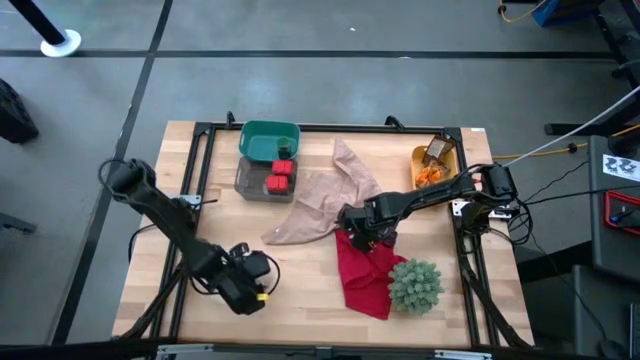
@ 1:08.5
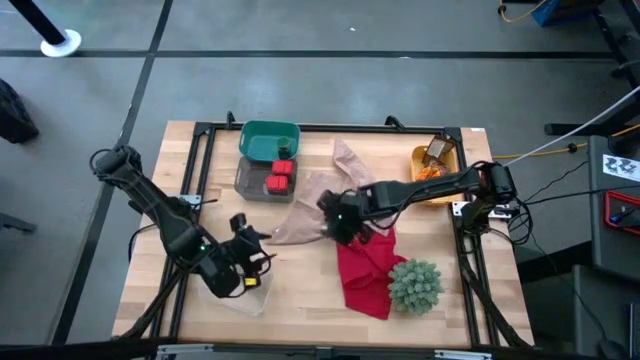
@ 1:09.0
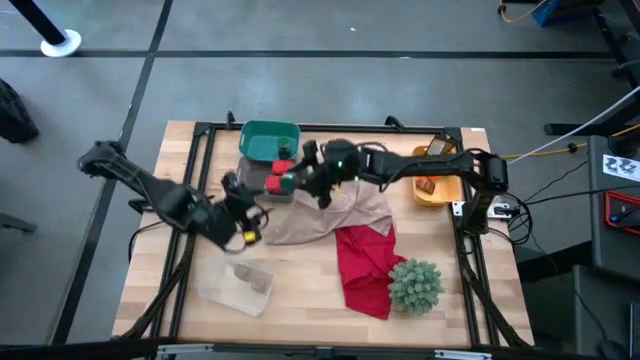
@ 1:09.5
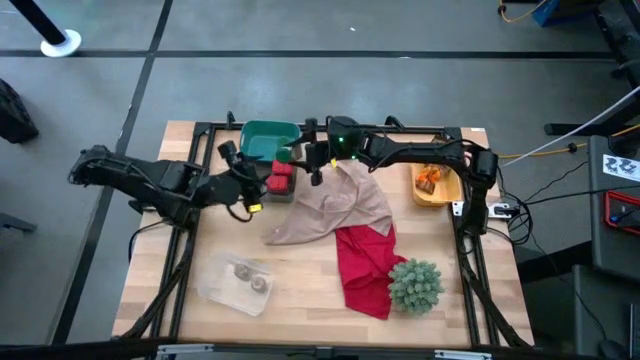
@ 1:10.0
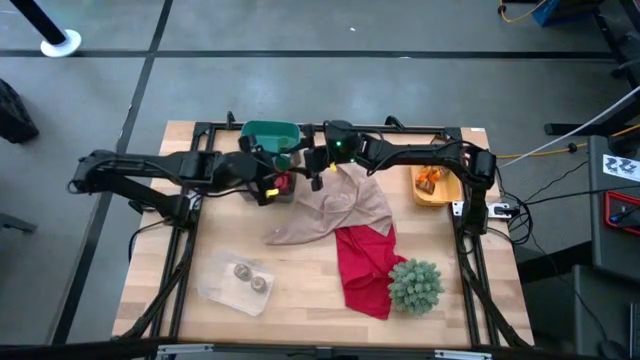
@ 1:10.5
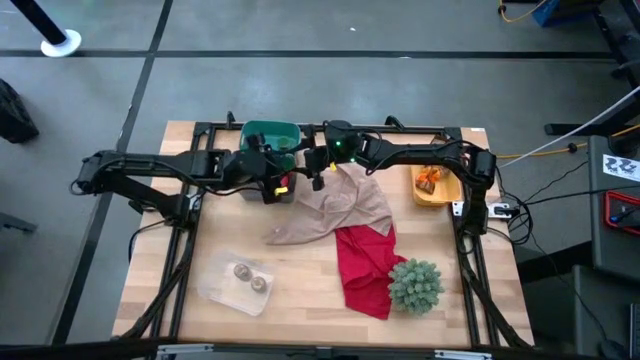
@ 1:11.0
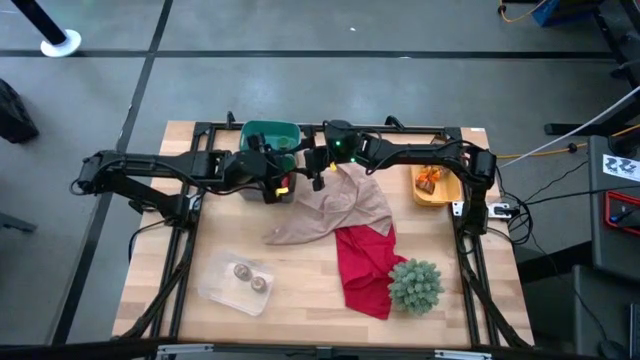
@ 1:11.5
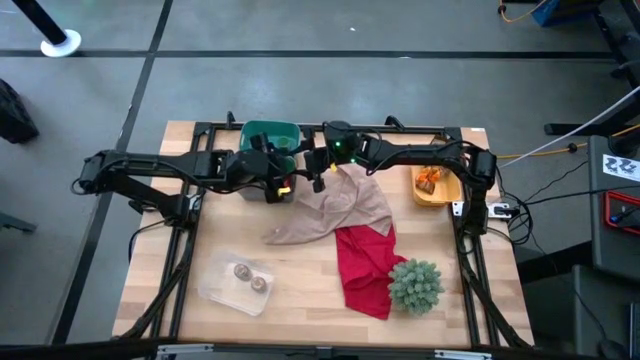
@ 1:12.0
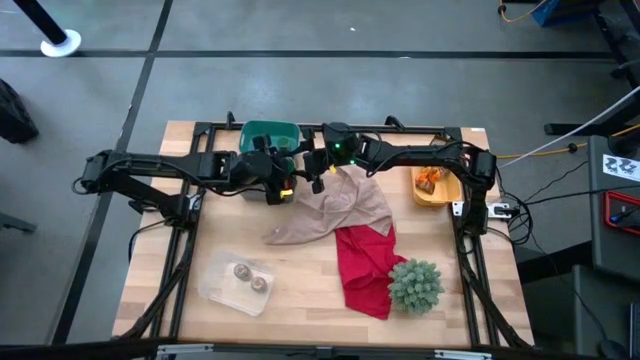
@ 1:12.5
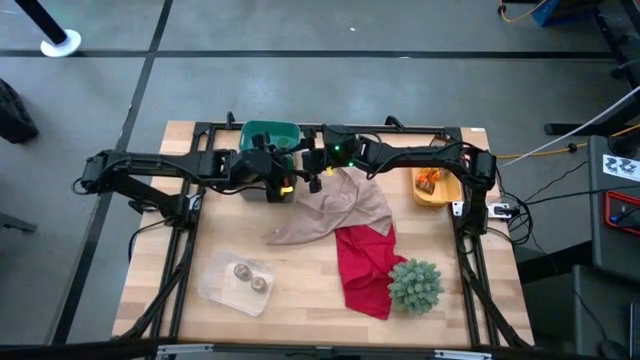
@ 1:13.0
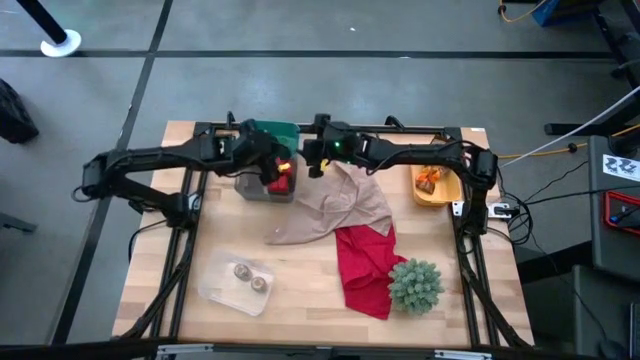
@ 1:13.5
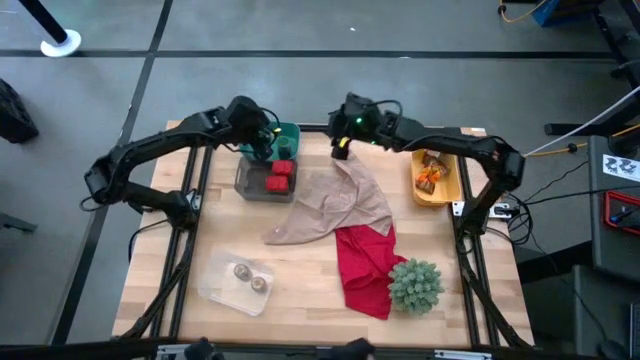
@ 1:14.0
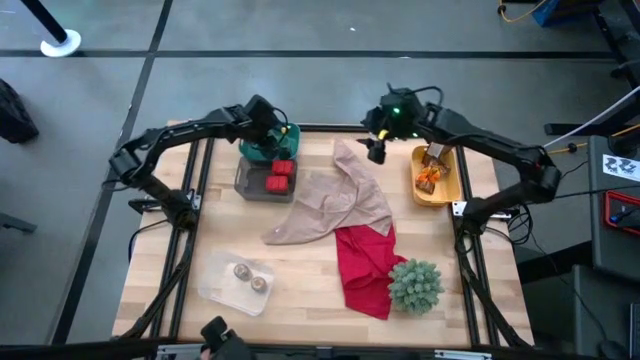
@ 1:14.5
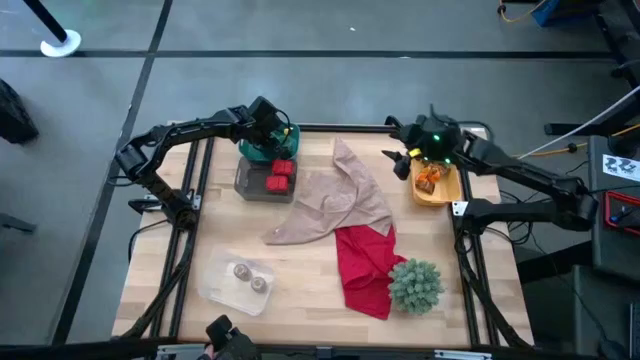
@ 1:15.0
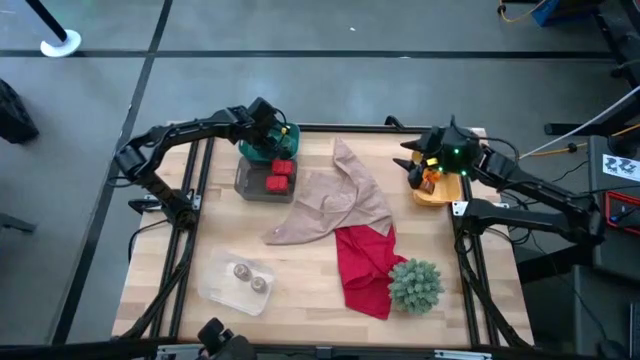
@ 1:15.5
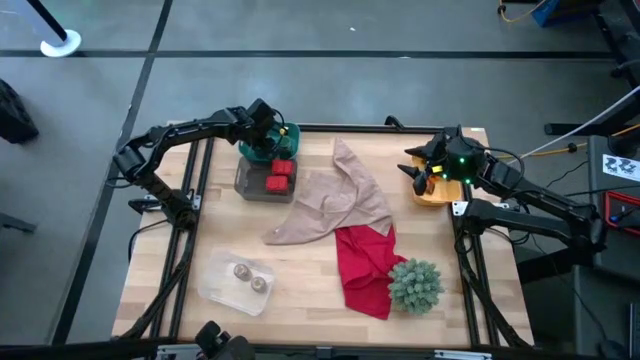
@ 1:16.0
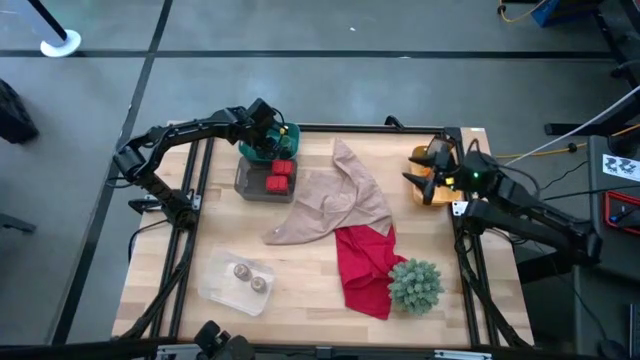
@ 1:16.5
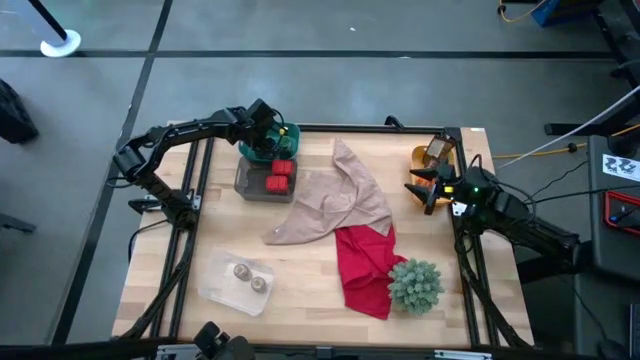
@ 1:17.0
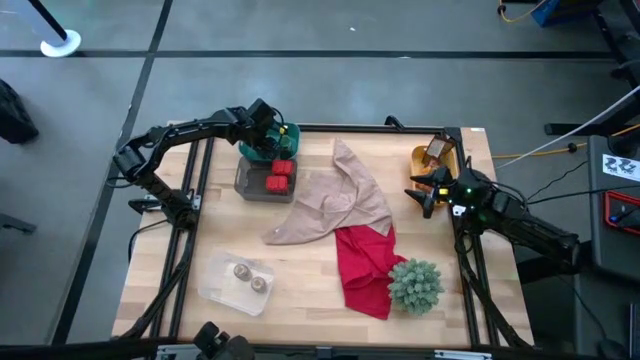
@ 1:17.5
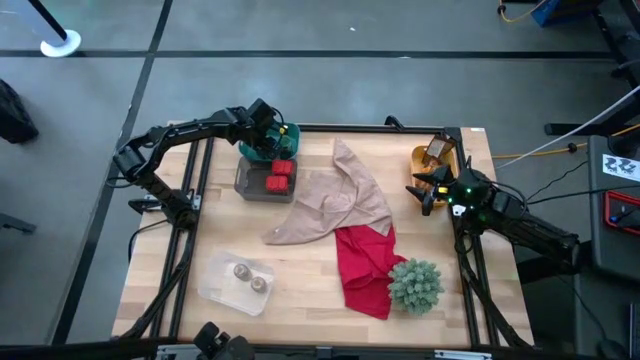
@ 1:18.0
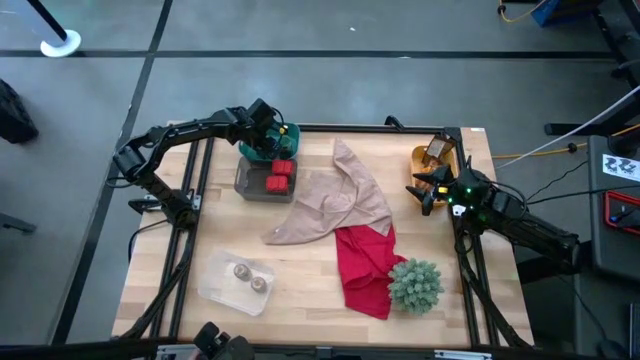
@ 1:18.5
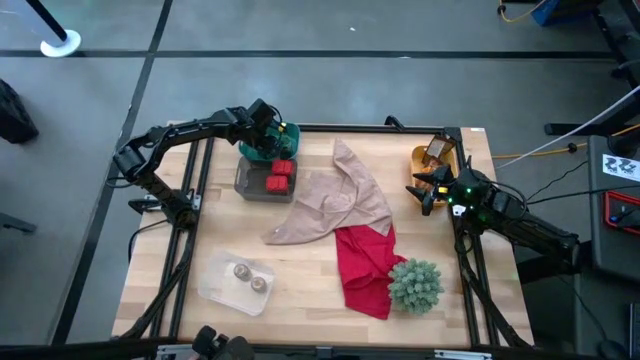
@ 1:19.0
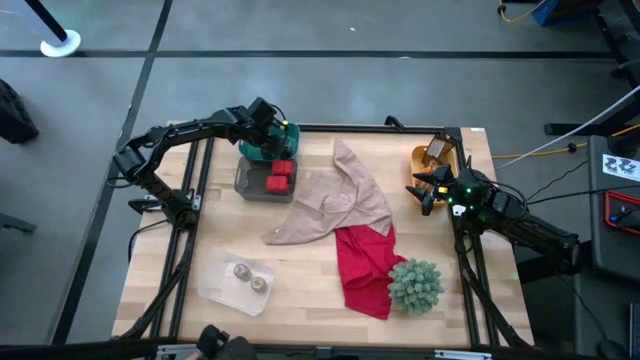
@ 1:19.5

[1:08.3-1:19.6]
Task: Sort spices by type
Put the green seasoning bottle into the green bin

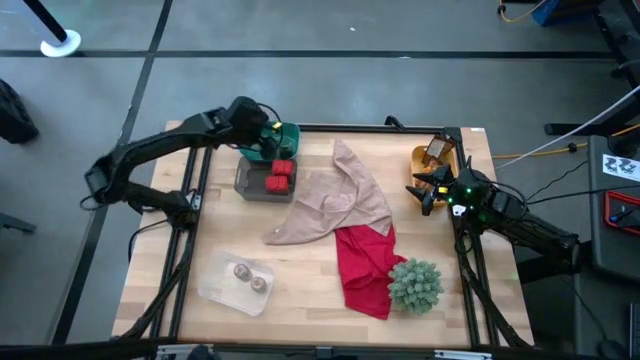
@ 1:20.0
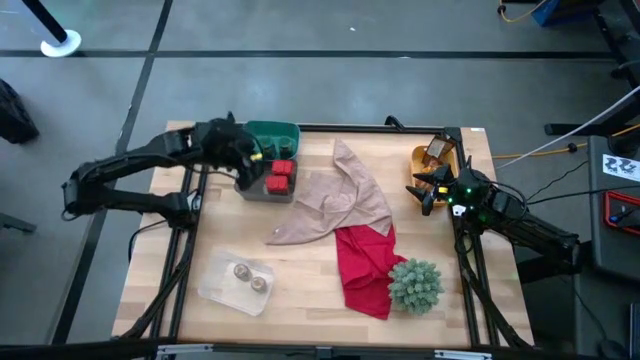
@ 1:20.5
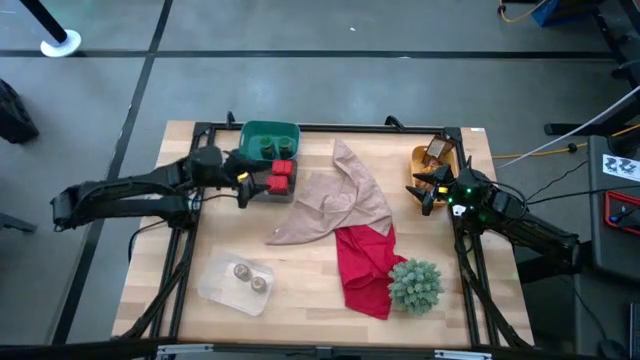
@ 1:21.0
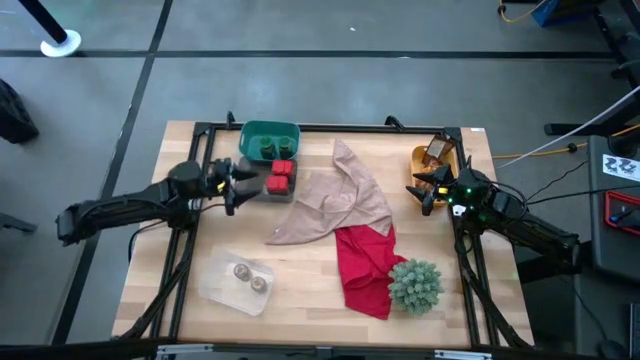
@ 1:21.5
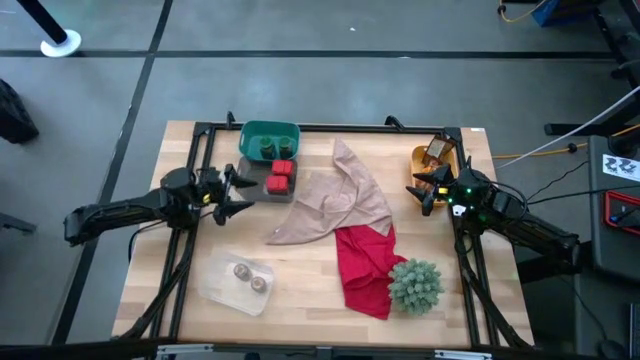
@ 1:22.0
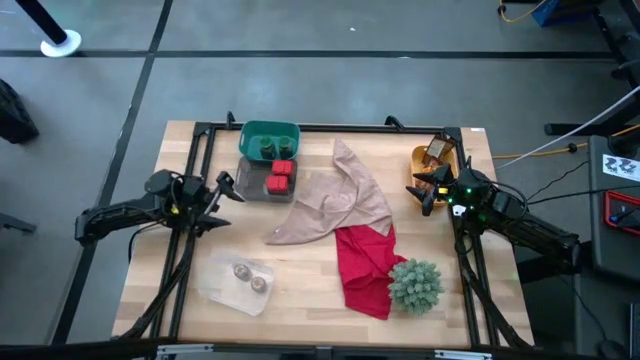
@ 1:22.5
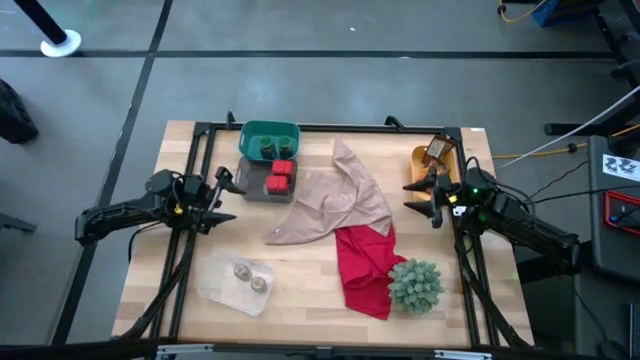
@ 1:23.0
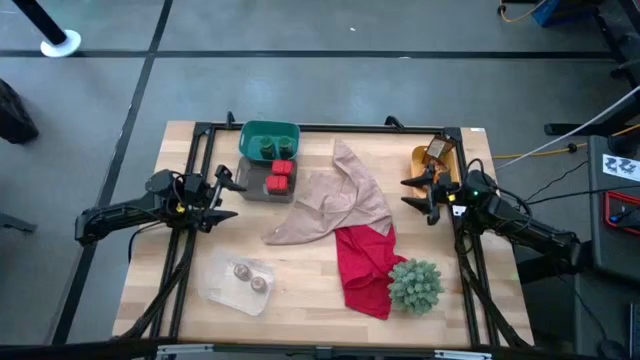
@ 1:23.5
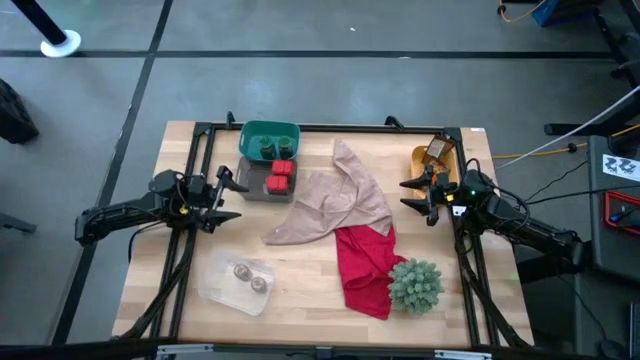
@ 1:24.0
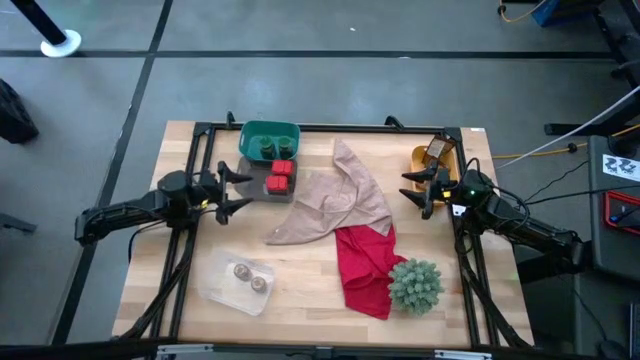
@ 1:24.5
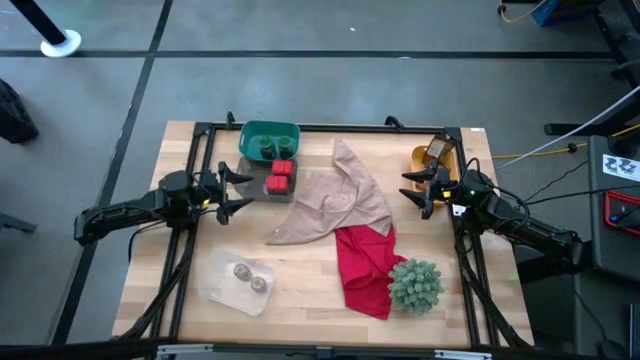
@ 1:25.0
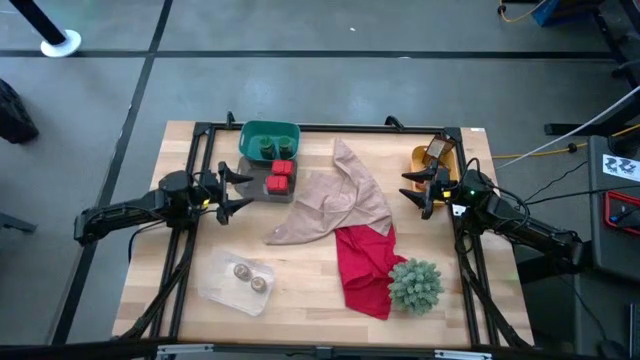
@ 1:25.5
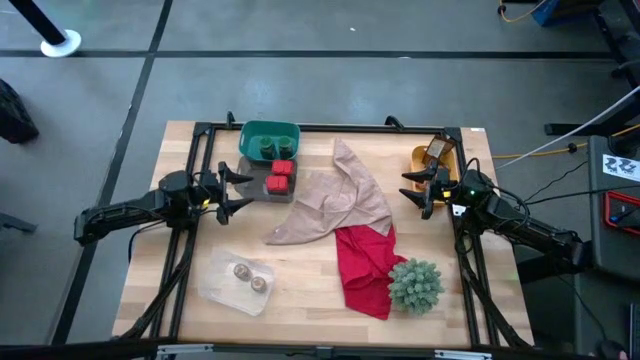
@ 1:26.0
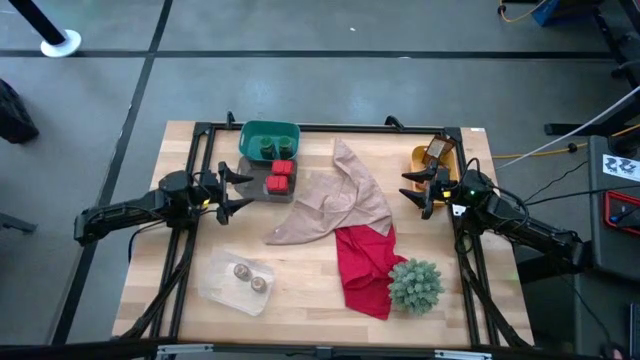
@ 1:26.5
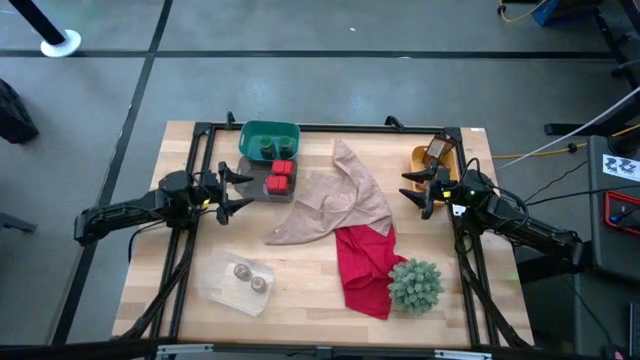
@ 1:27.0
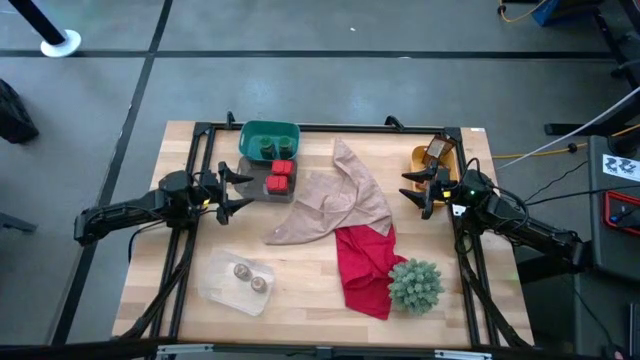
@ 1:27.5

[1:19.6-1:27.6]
Return to Home Position
